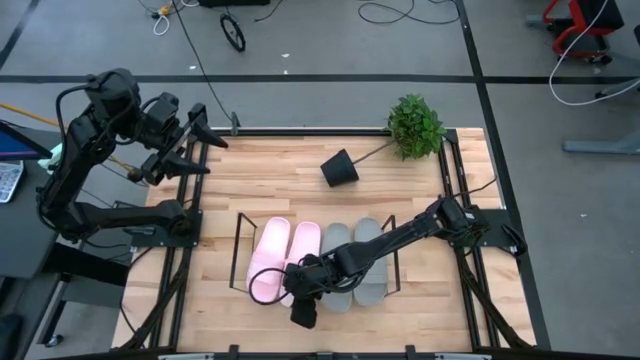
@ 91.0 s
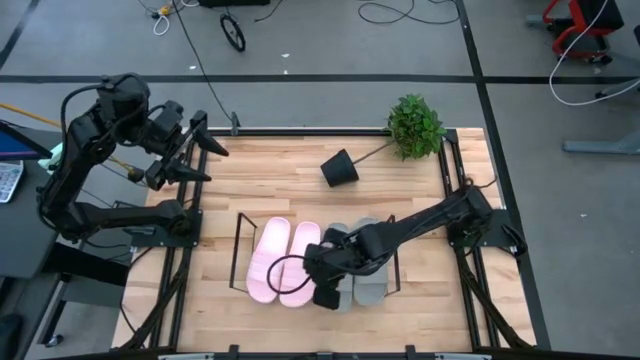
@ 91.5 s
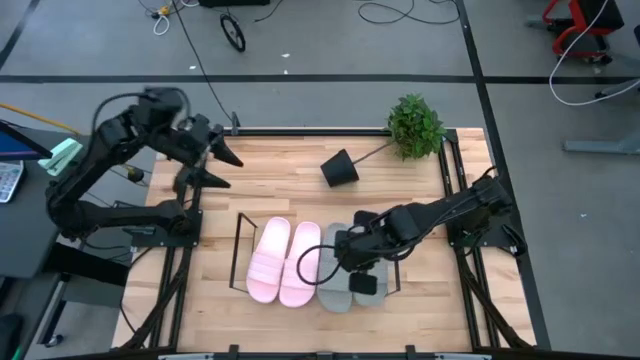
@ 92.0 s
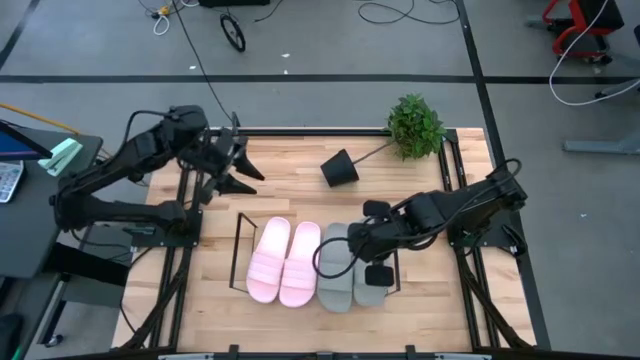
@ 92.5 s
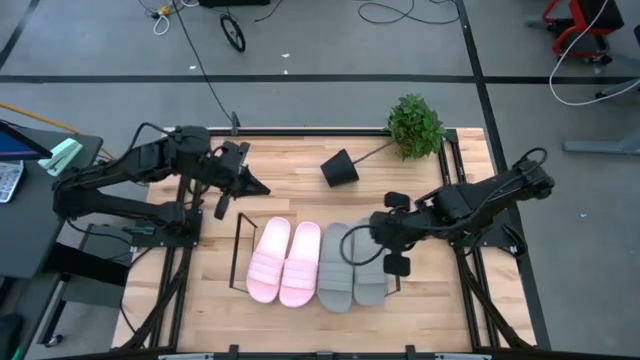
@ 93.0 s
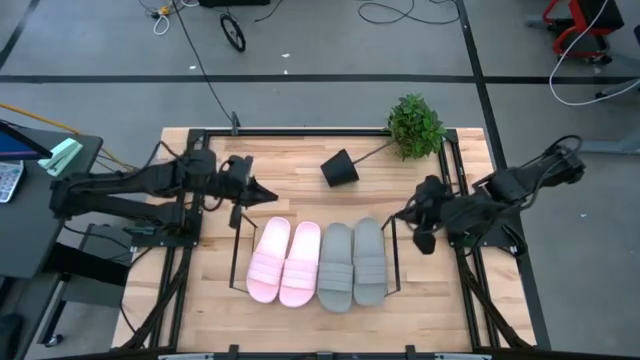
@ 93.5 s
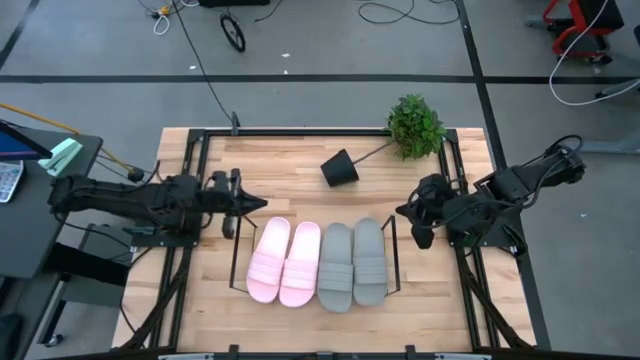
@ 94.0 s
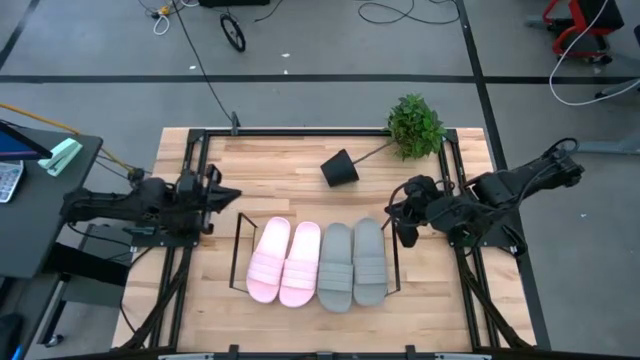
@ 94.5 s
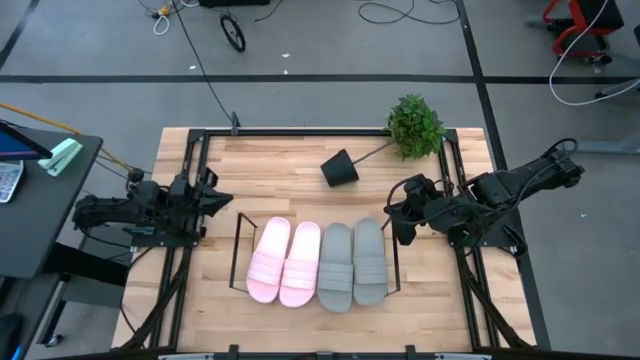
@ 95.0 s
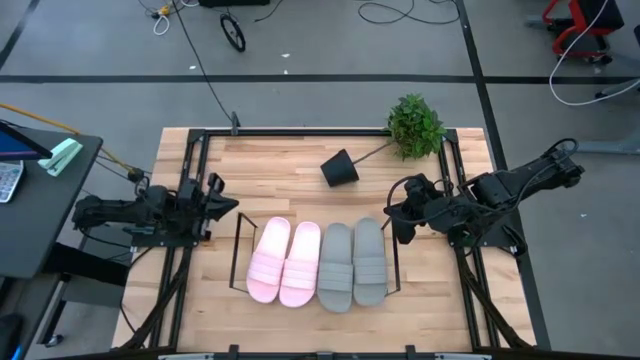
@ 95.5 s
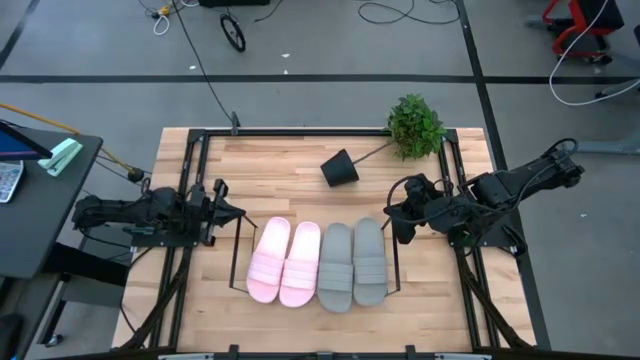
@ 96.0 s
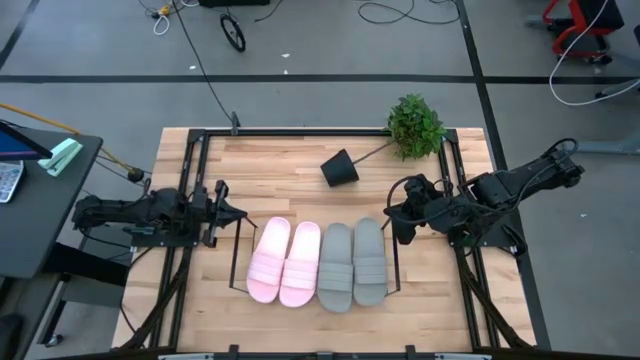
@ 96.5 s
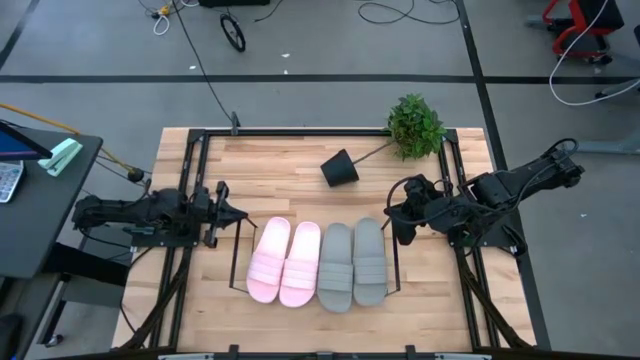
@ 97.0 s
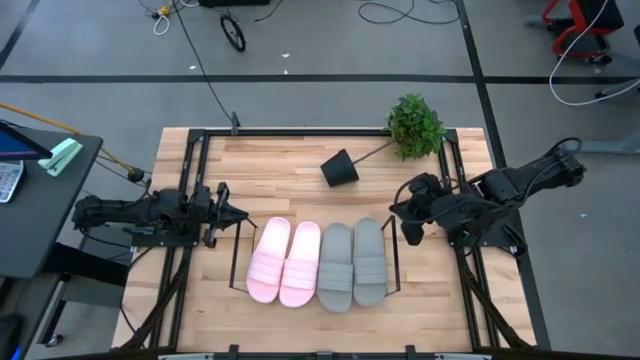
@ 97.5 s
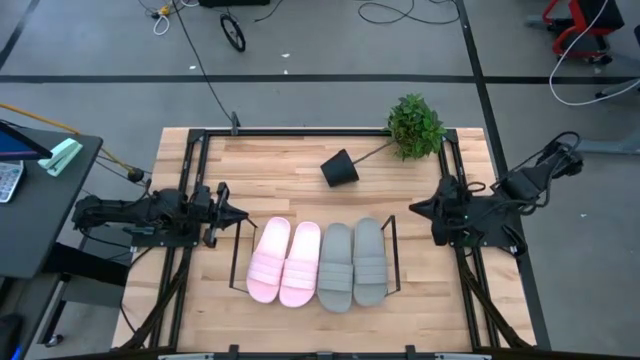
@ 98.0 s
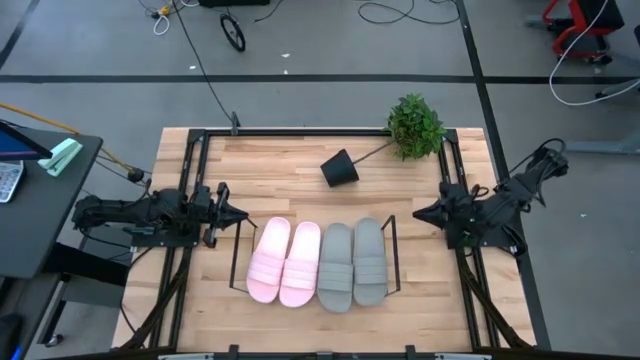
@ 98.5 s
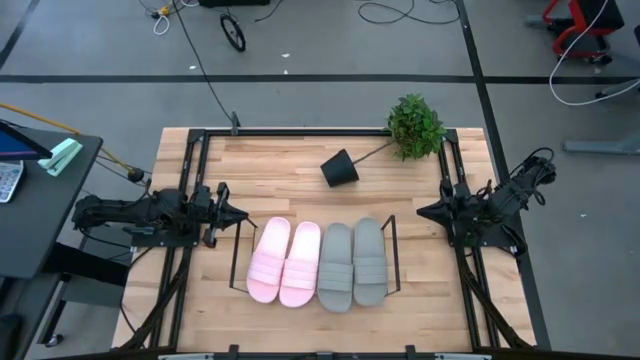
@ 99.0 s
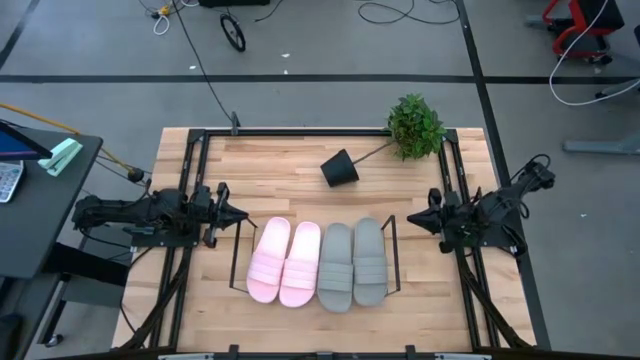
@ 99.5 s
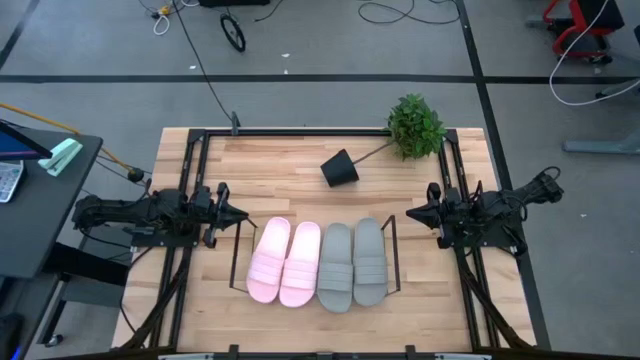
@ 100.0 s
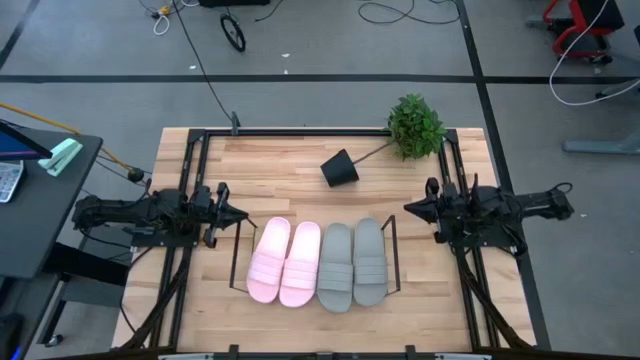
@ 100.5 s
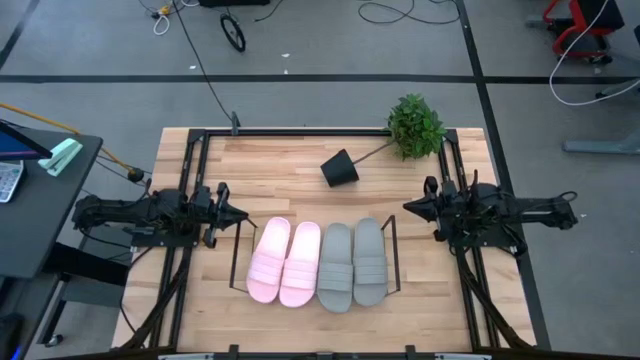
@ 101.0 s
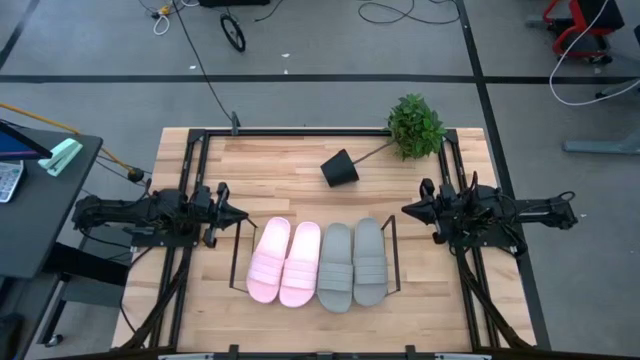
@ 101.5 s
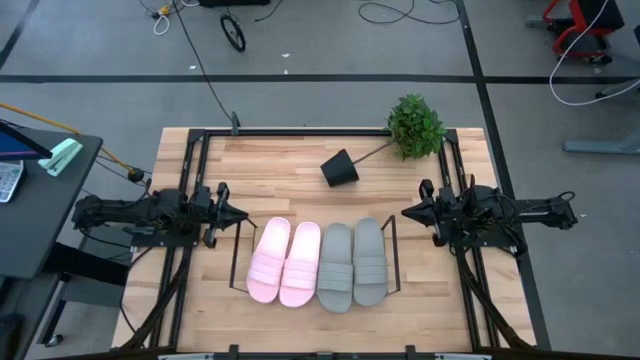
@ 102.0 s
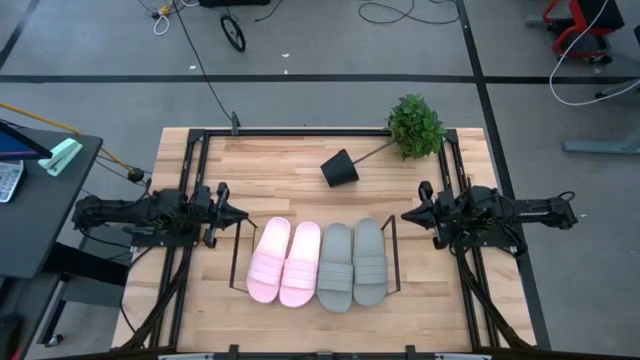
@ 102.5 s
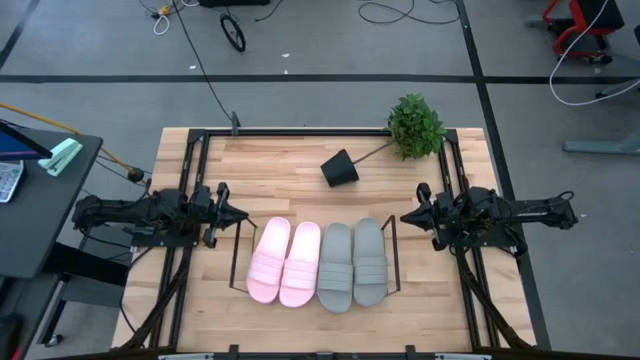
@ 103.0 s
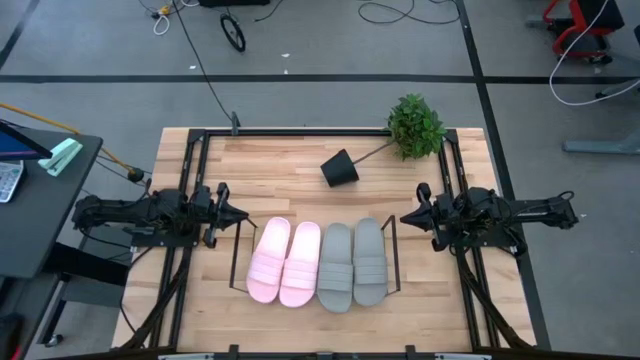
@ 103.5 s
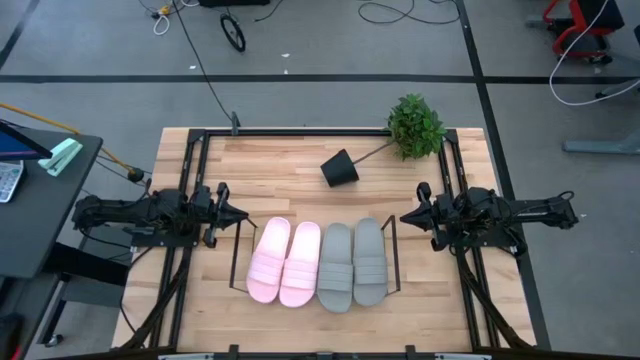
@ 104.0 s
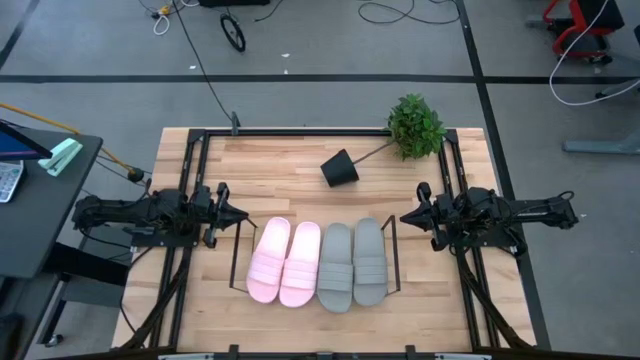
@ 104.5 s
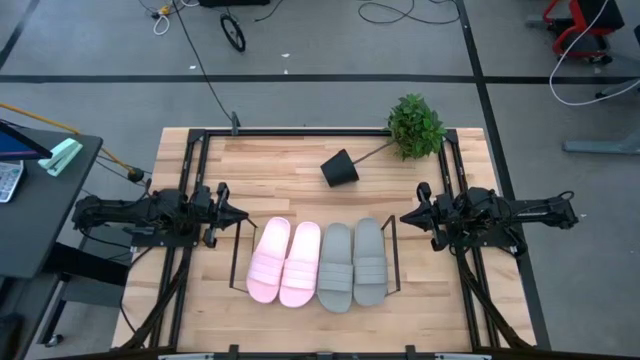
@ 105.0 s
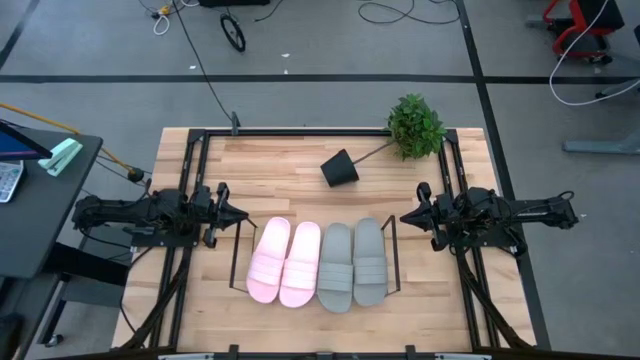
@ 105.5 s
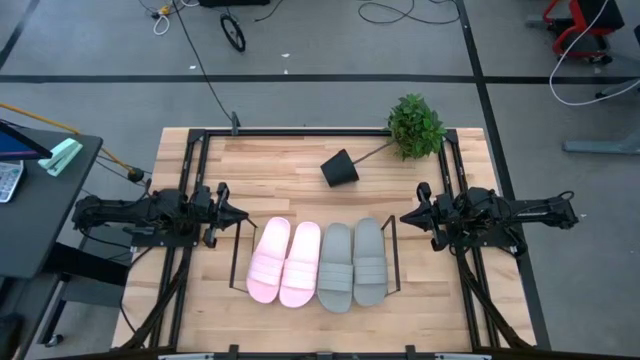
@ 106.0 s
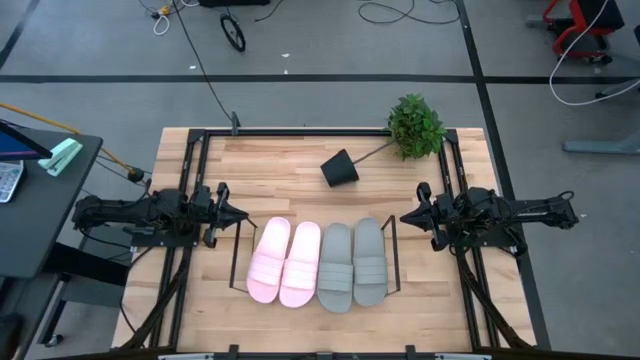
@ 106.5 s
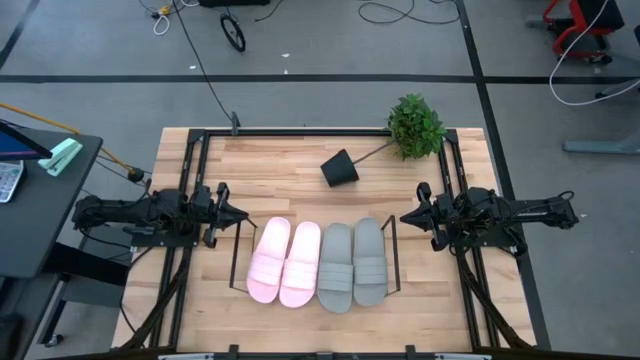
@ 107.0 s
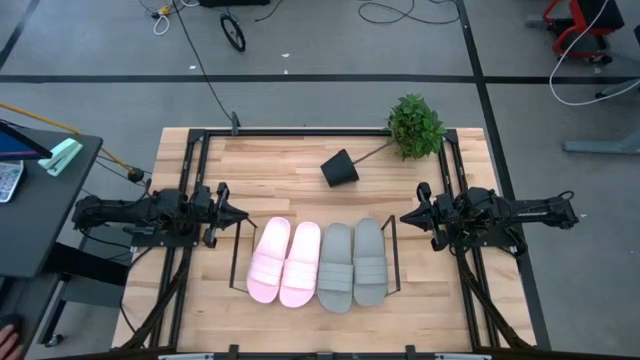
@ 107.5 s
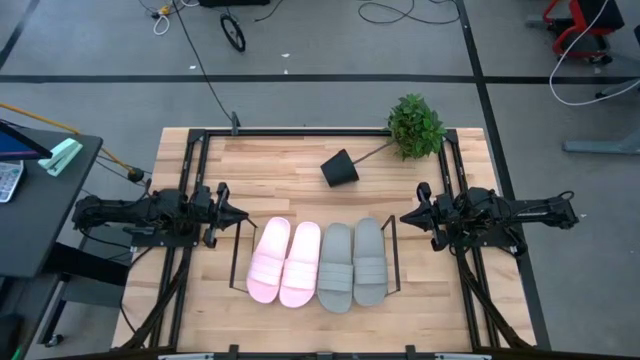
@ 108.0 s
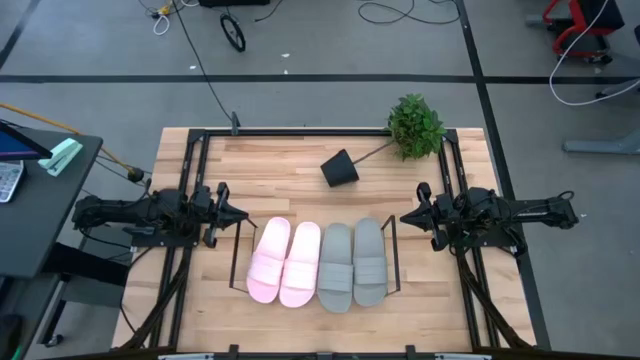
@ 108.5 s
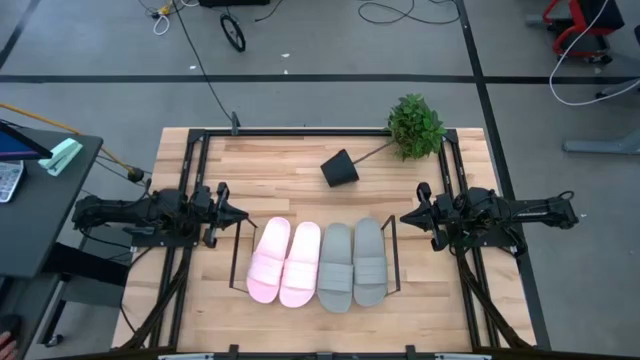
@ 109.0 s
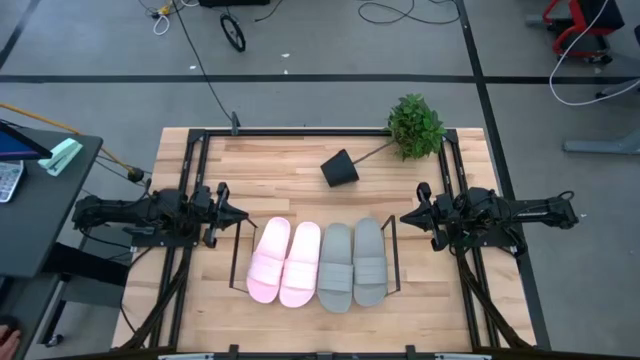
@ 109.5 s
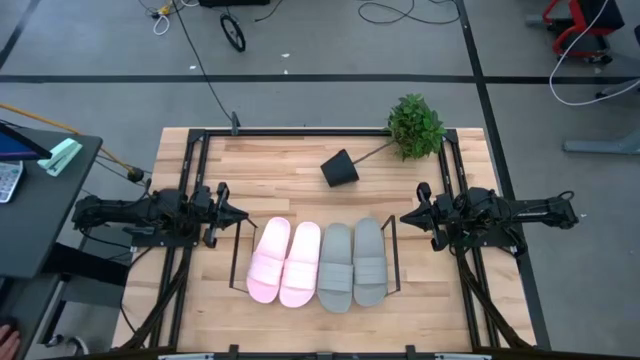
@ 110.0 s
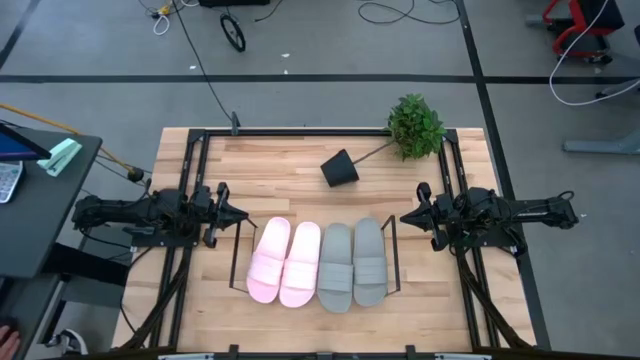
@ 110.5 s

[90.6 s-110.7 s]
Task: Pick and place slides into the shelf
Return to Home Position

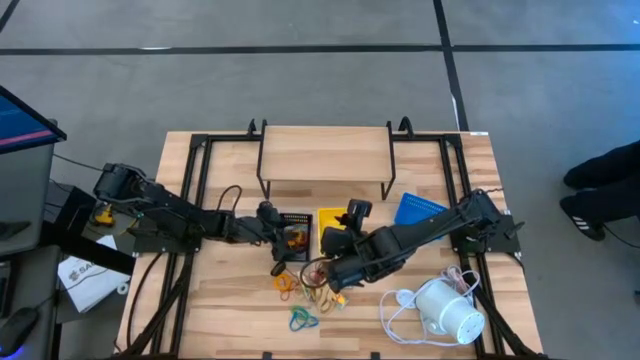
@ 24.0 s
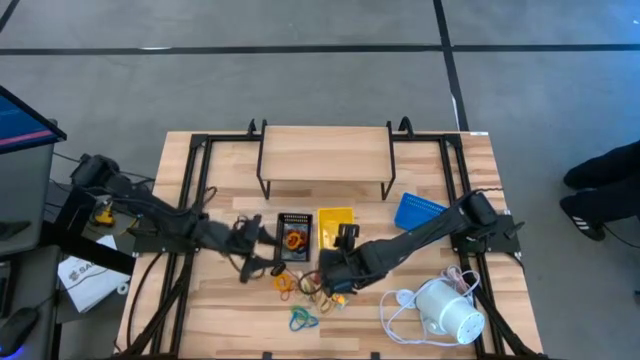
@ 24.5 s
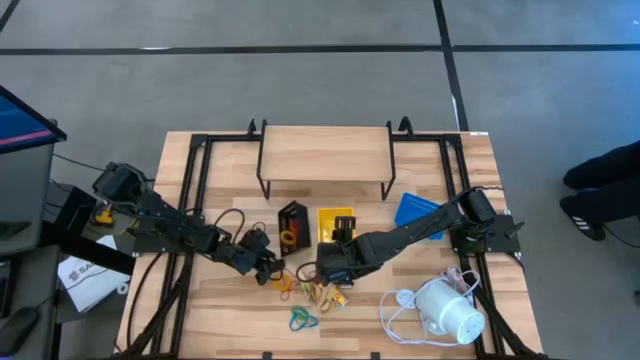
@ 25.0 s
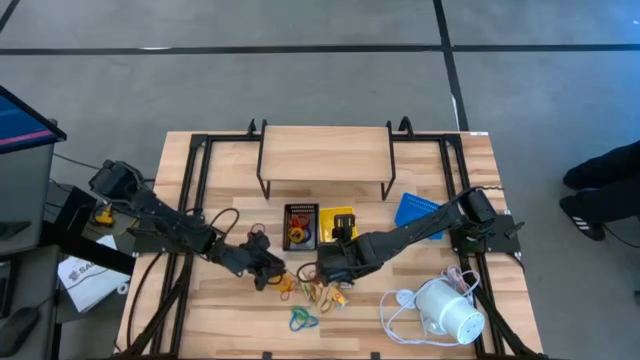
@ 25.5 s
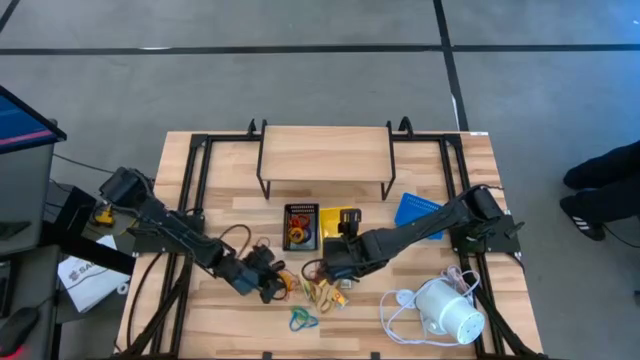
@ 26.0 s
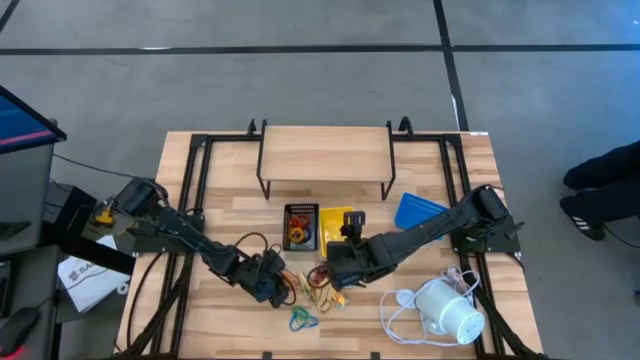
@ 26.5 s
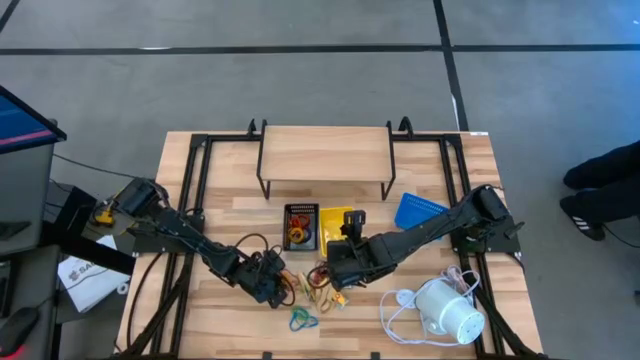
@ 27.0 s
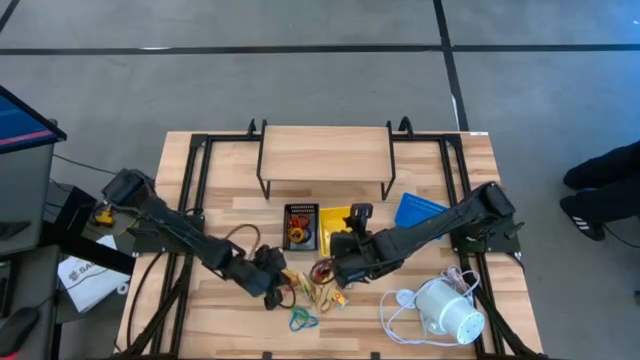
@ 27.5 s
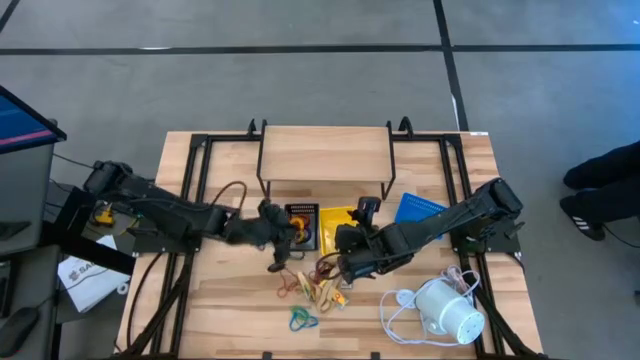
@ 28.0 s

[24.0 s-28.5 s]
Task: Pick & Place Office Desk Supplies
Put the yellow spring keychain into the black bin
